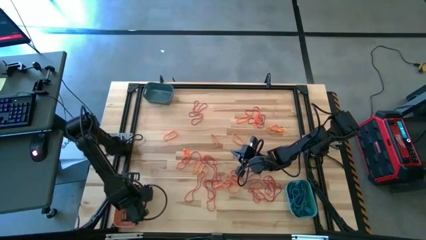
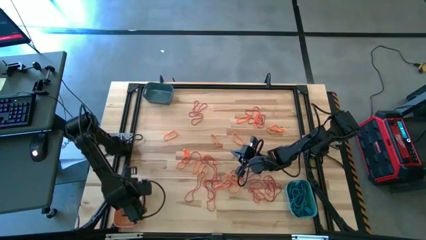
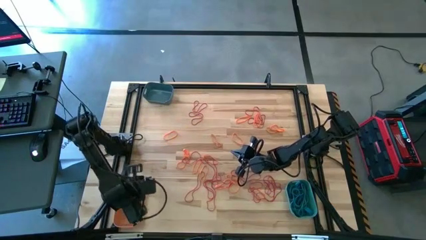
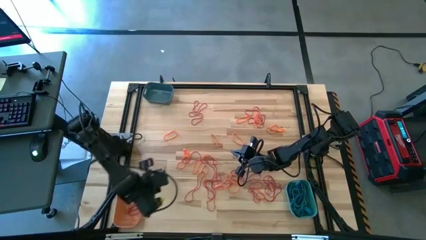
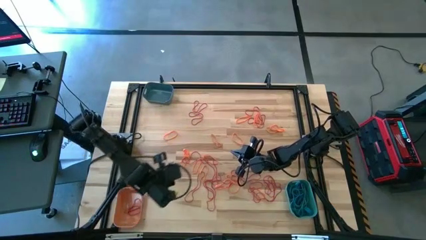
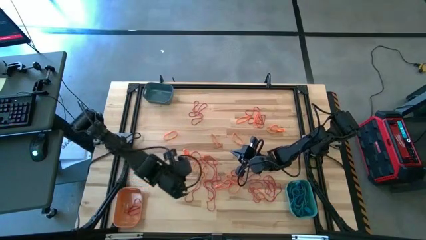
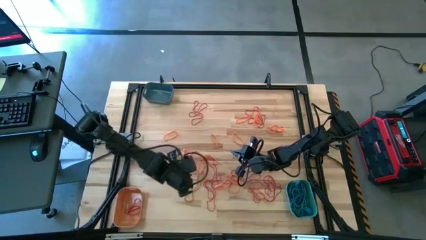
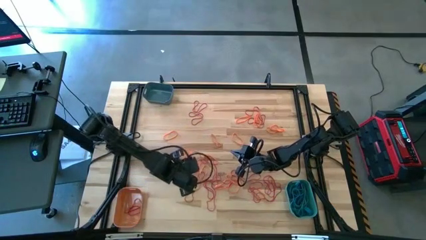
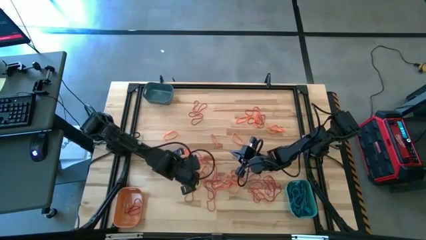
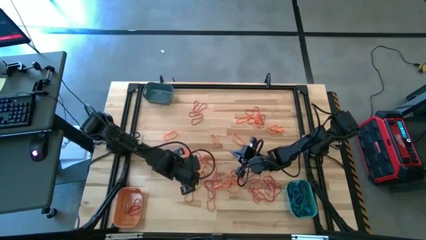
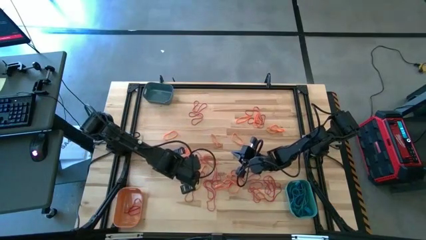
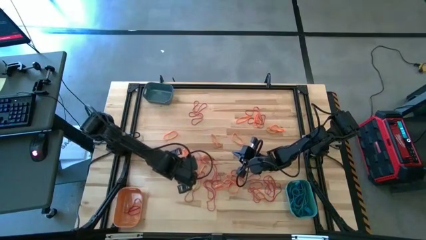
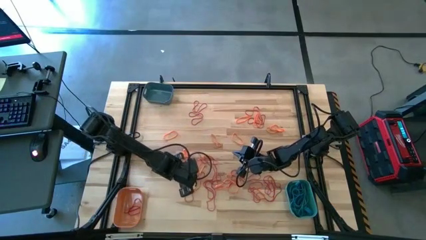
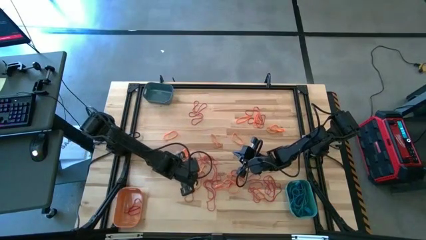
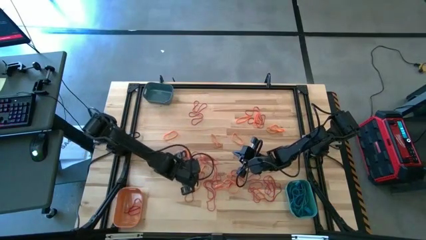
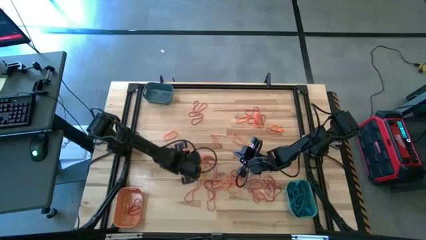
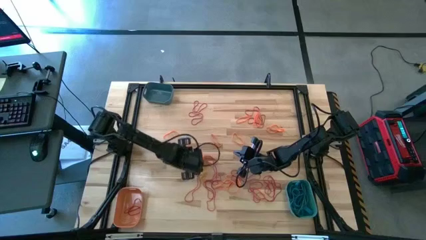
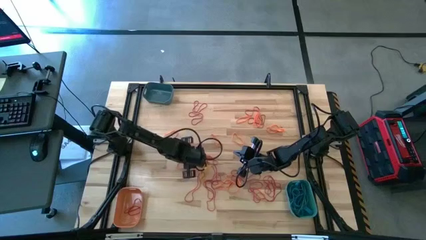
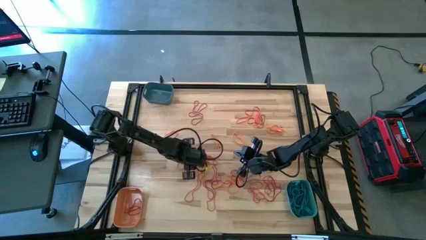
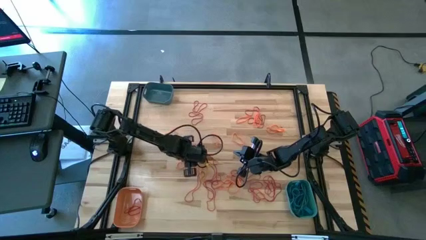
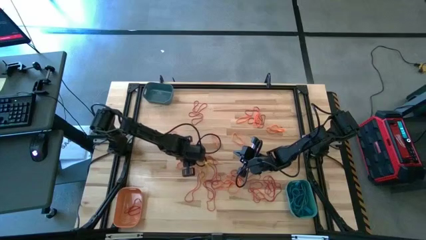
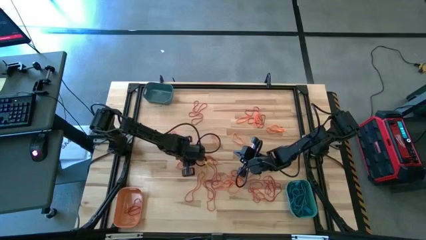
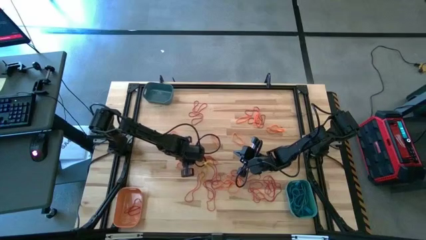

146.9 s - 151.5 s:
Task: Sort rubber bands into baskets
Put the red rubber band into the orange bin

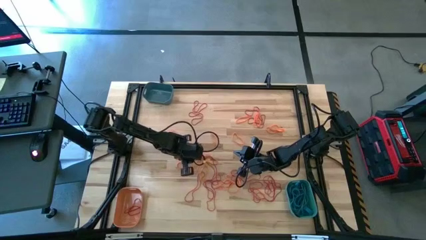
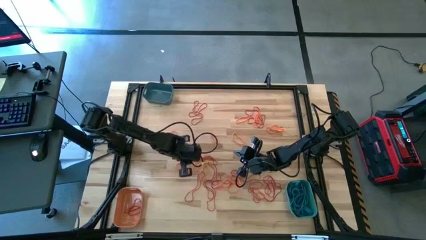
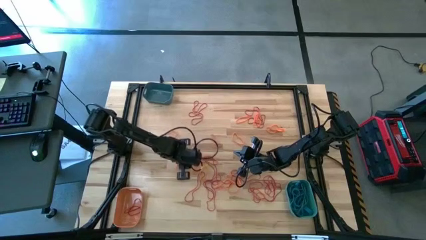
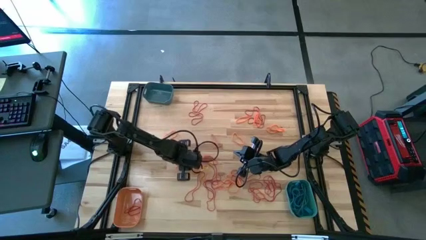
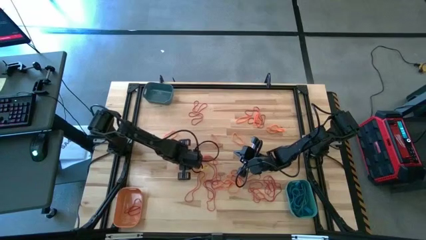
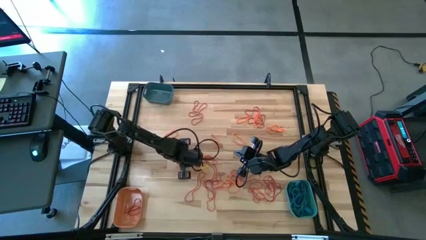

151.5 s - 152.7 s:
Put the red rubber band into the orange bin

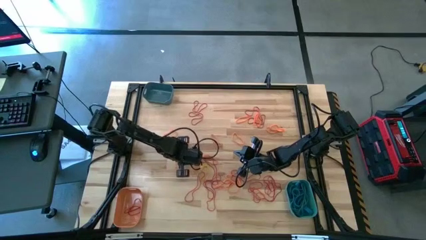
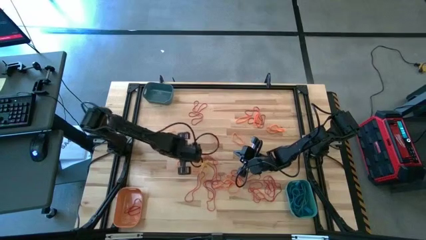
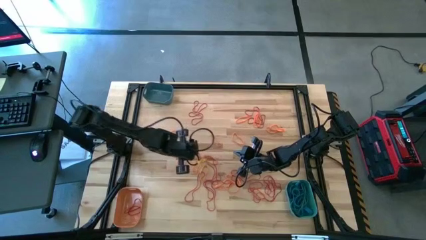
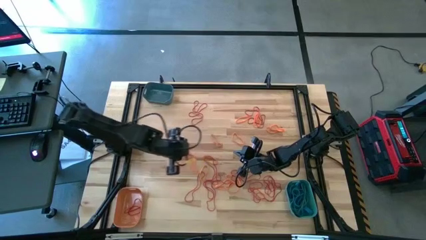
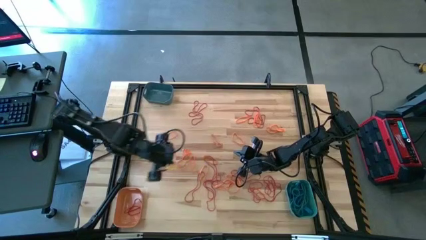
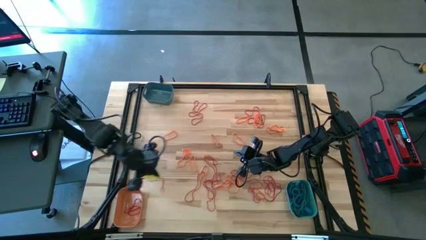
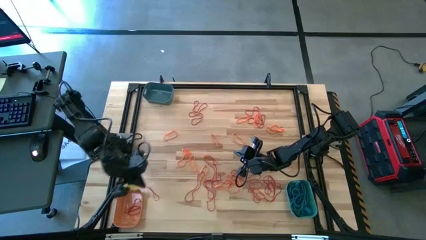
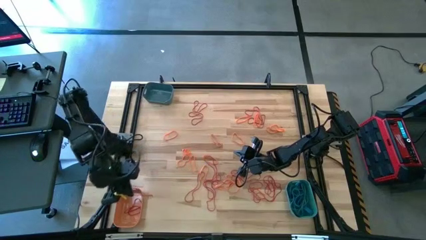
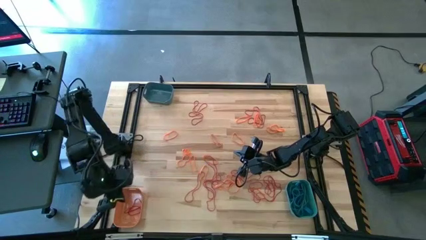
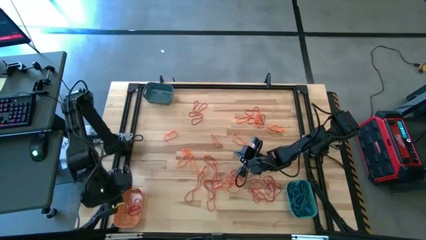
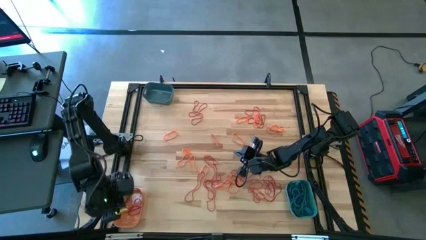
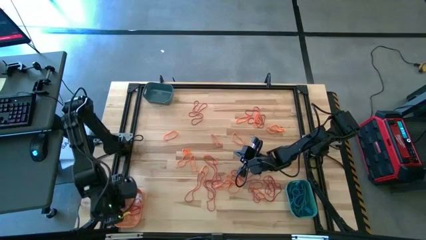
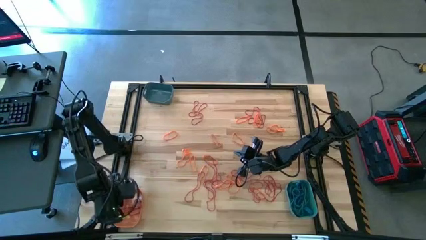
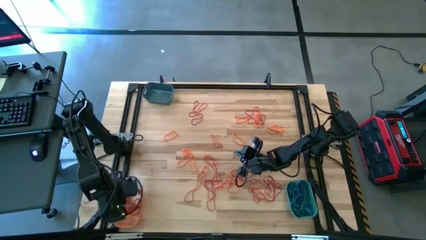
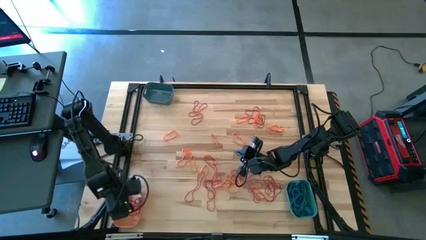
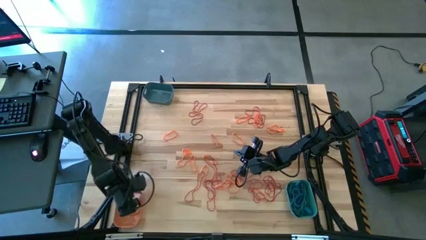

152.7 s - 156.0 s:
Put the red rubber band into the orange bin

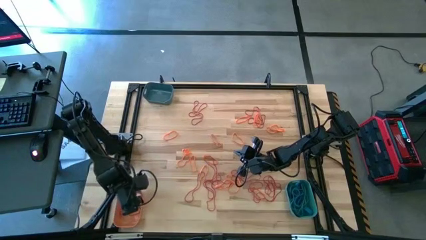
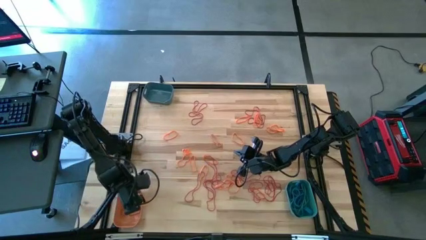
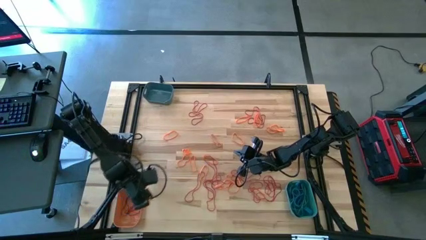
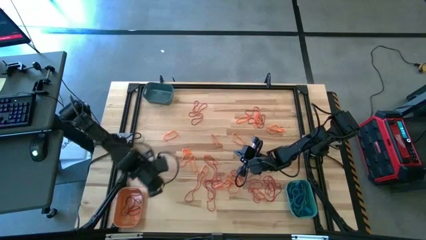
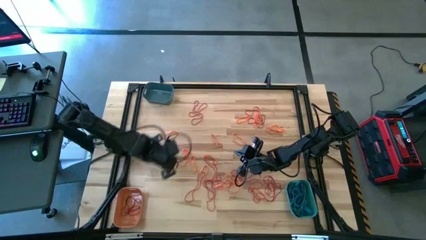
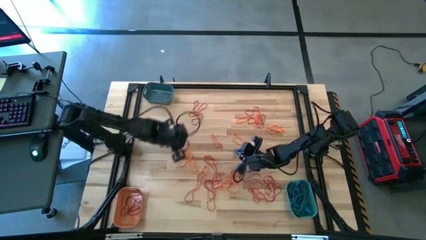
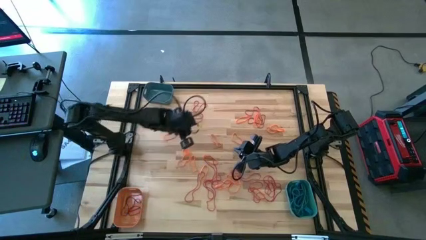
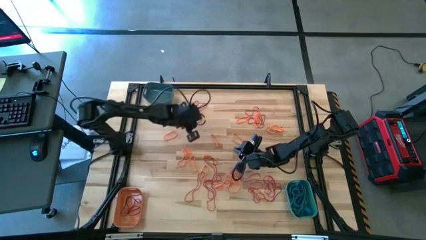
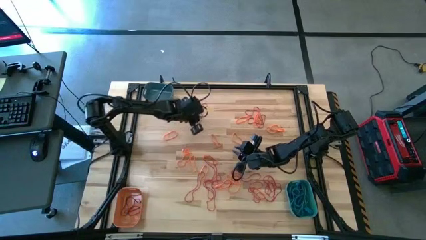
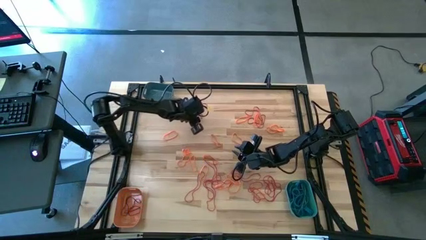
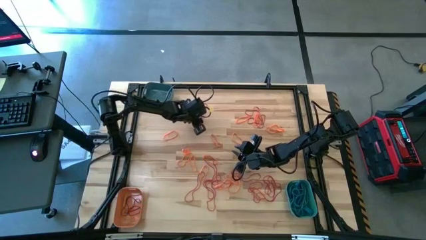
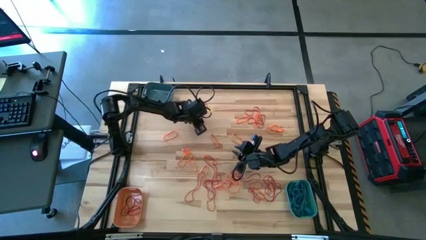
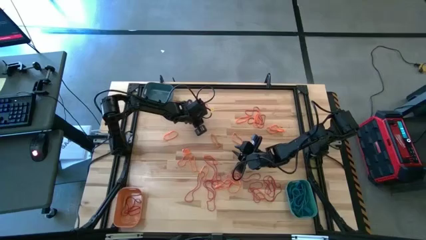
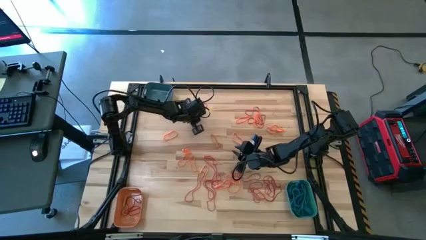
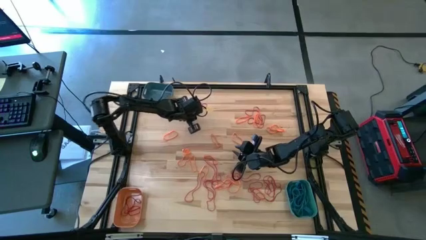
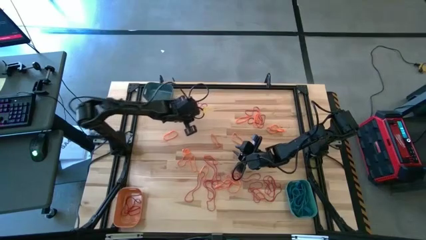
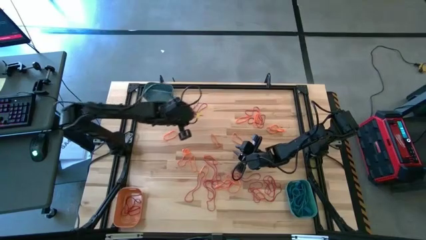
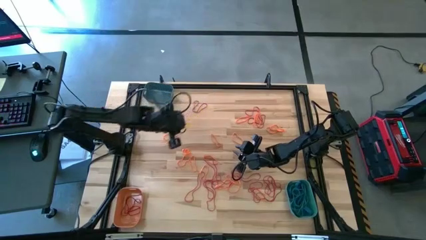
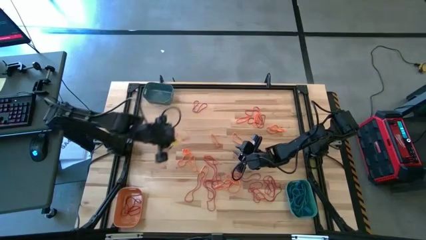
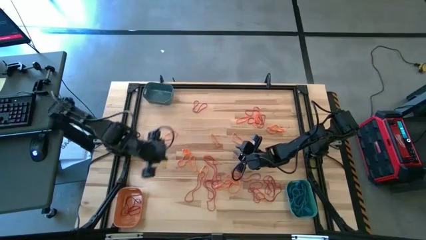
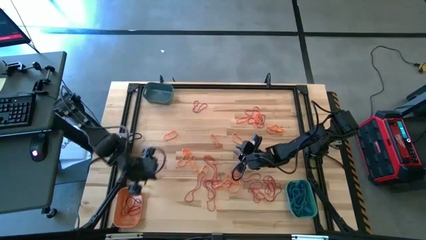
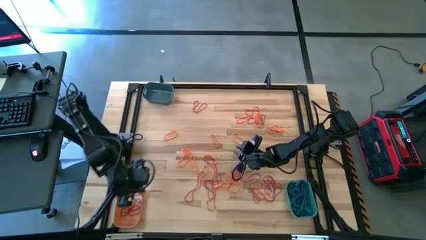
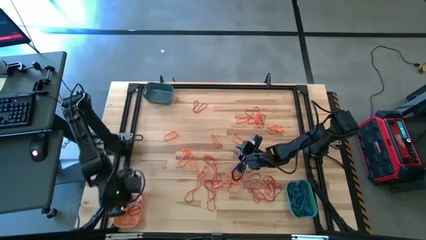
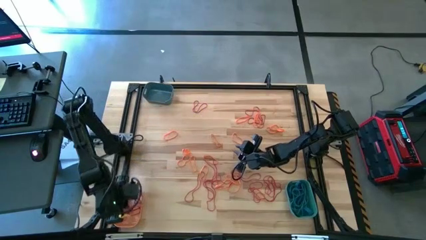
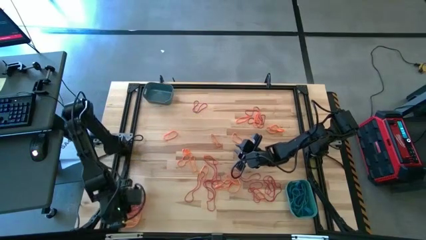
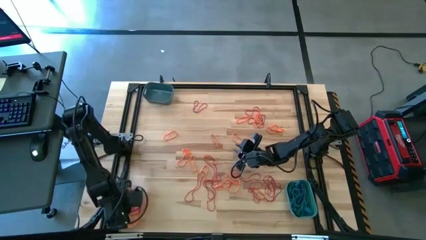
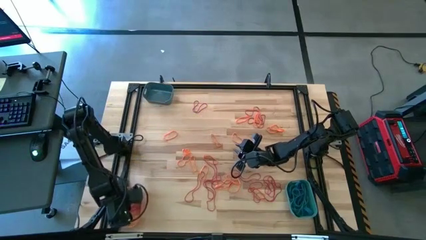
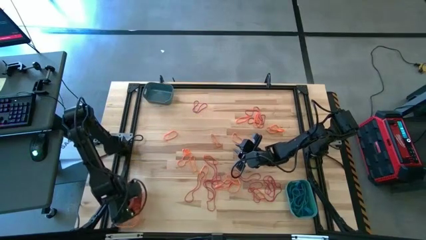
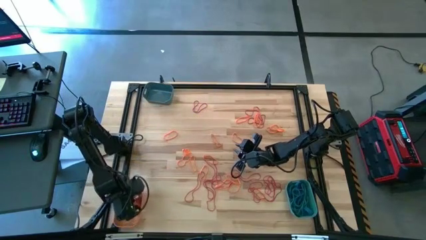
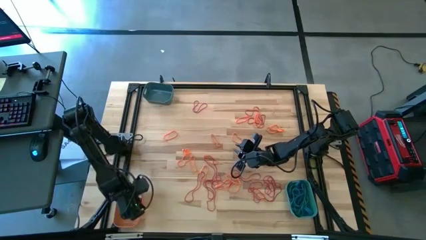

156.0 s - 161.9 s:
Put the red rubber band into the orange bin
